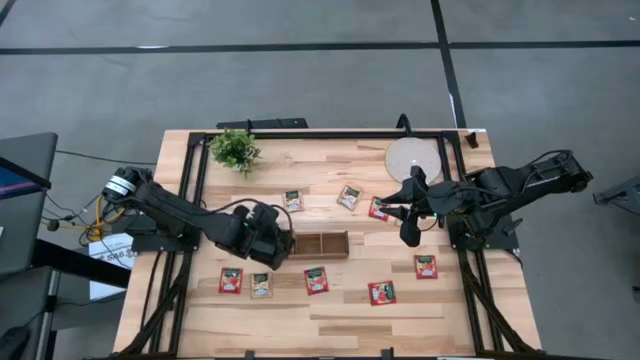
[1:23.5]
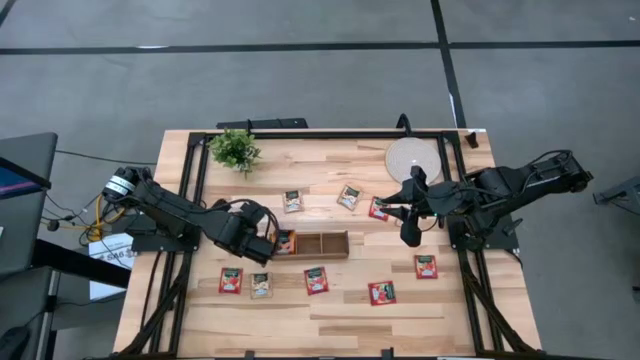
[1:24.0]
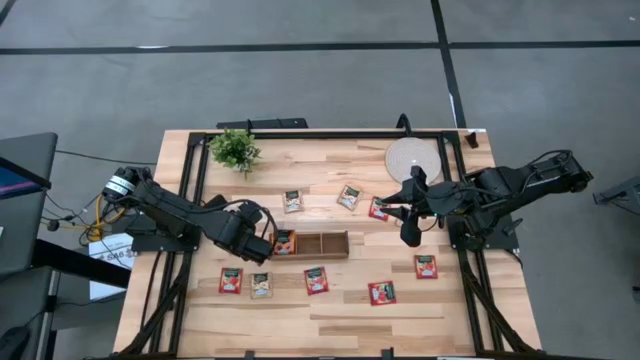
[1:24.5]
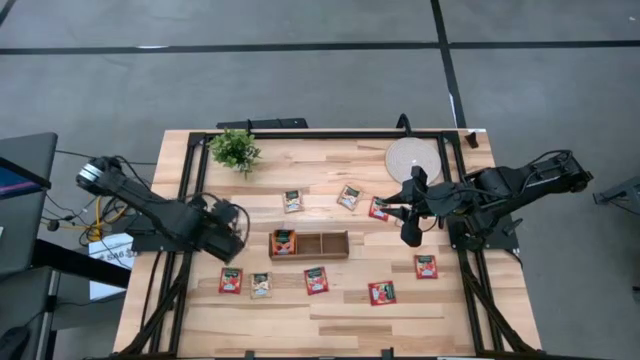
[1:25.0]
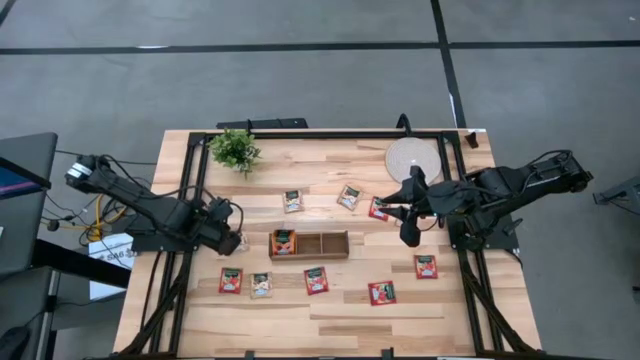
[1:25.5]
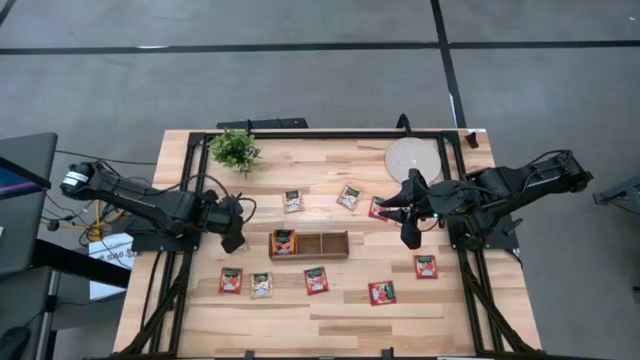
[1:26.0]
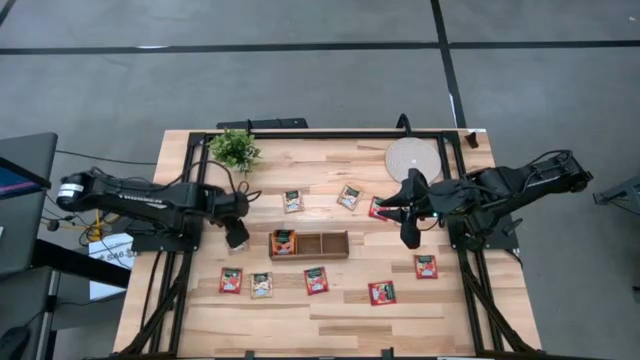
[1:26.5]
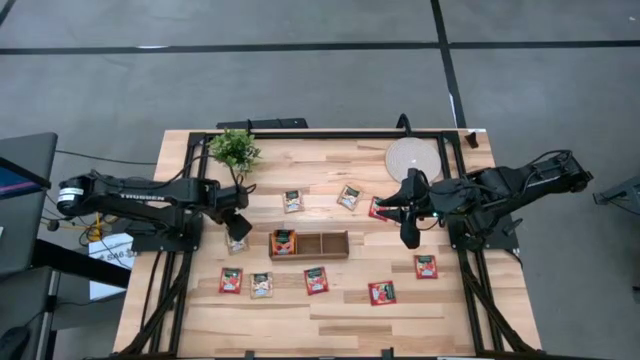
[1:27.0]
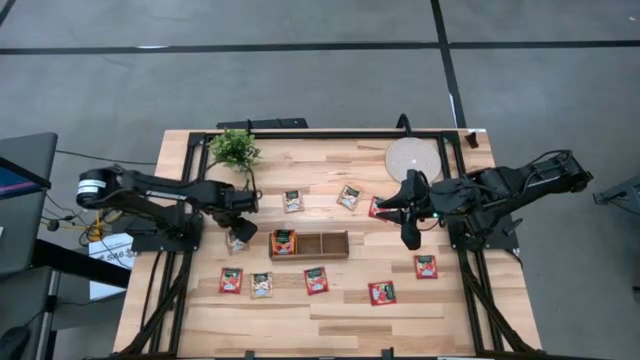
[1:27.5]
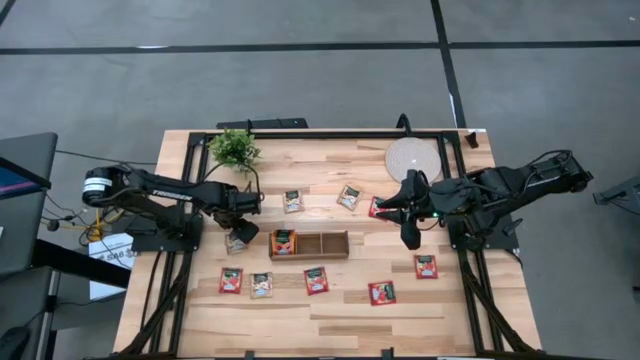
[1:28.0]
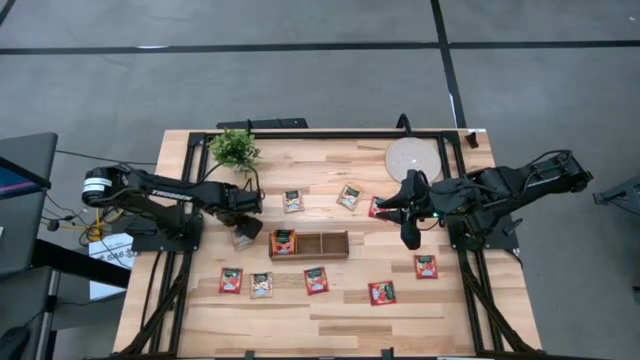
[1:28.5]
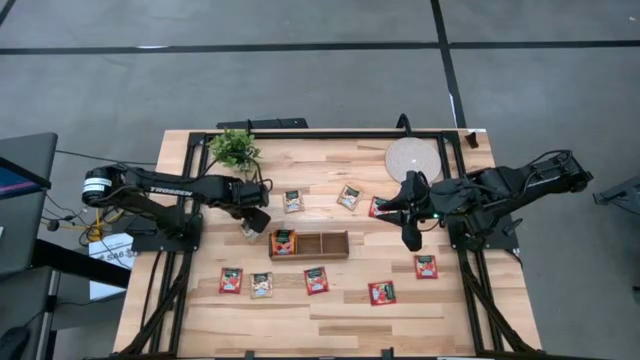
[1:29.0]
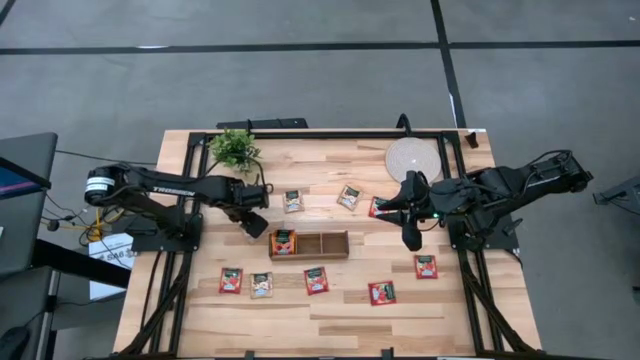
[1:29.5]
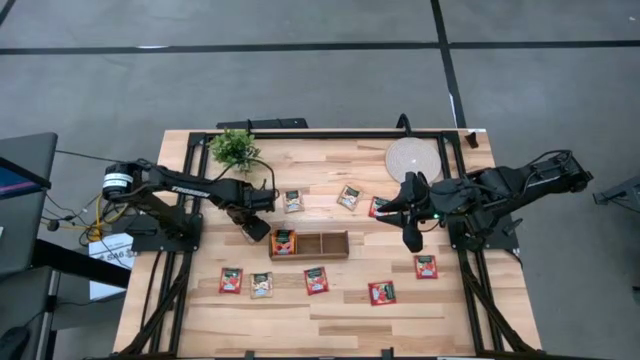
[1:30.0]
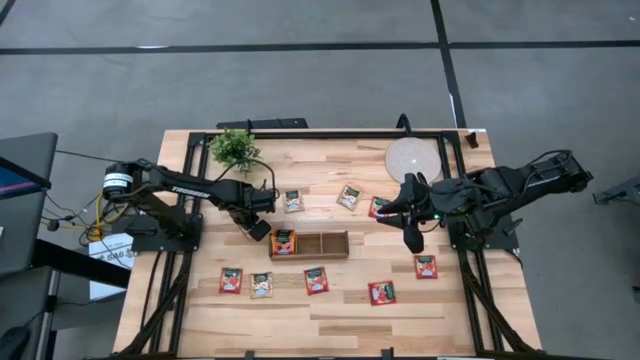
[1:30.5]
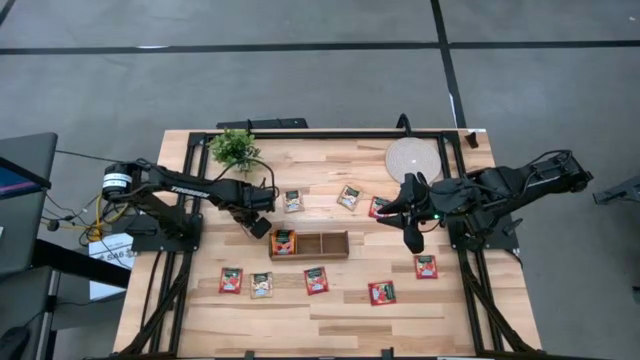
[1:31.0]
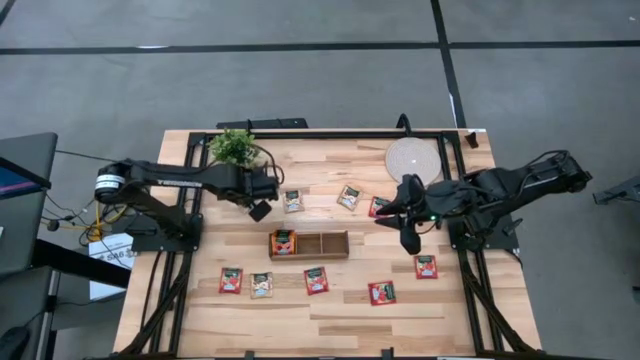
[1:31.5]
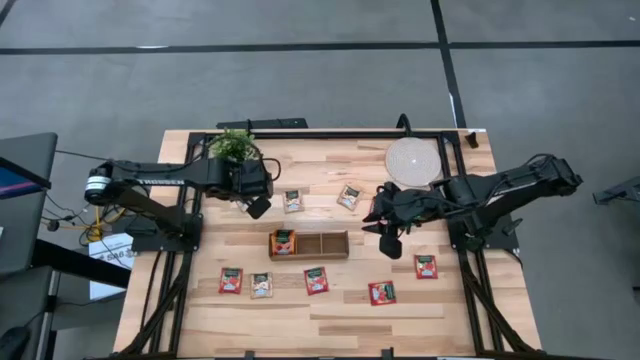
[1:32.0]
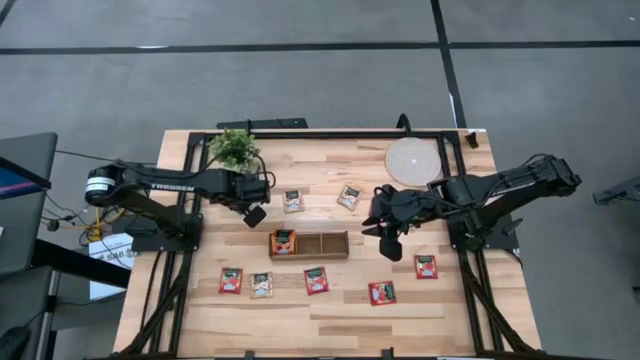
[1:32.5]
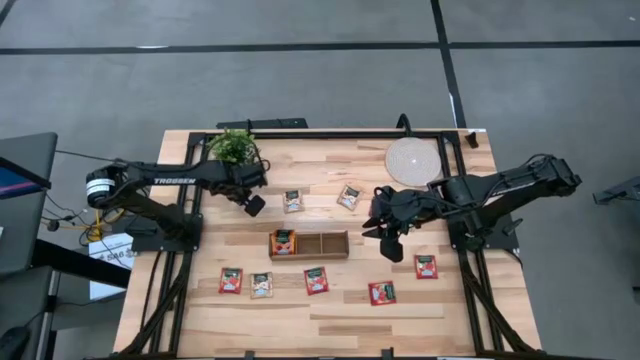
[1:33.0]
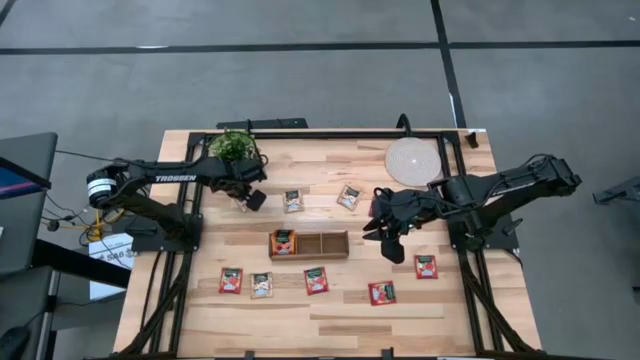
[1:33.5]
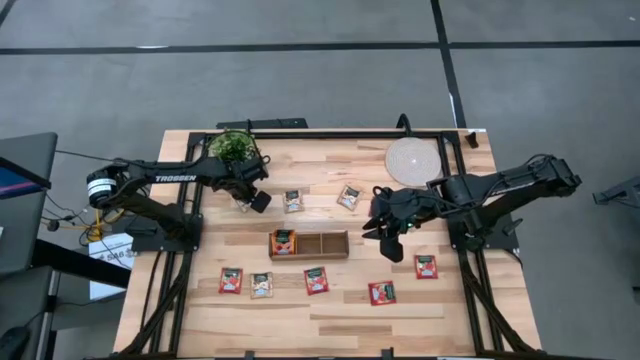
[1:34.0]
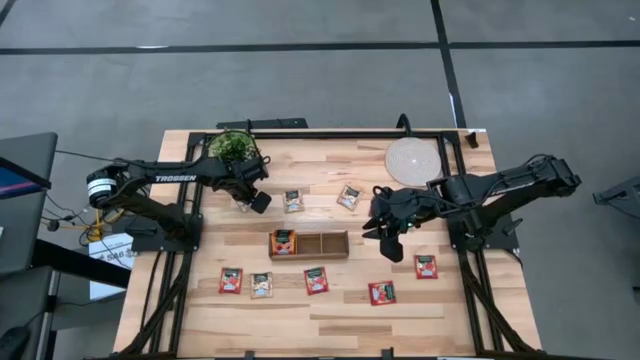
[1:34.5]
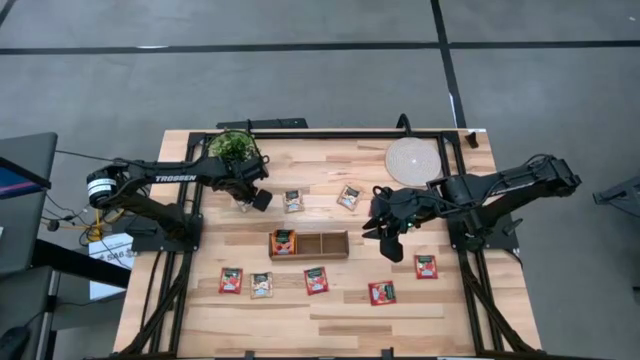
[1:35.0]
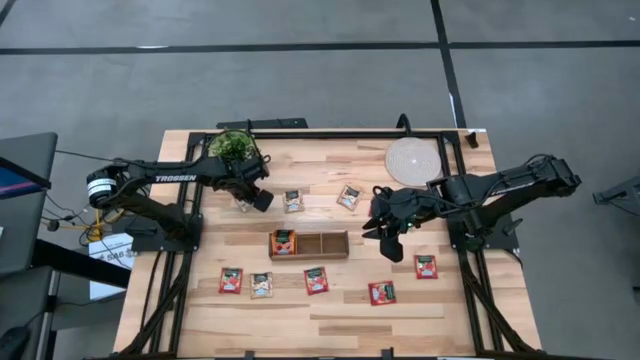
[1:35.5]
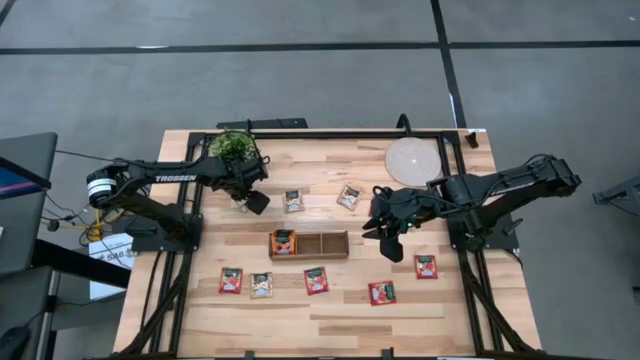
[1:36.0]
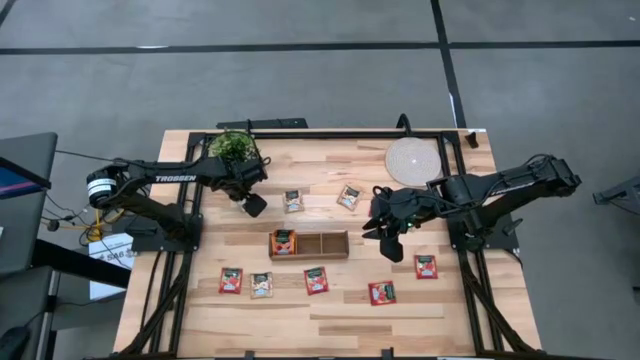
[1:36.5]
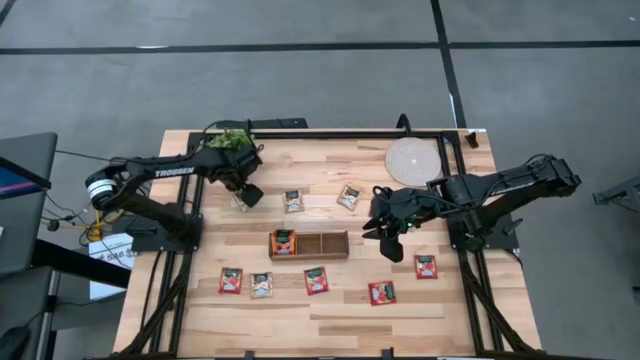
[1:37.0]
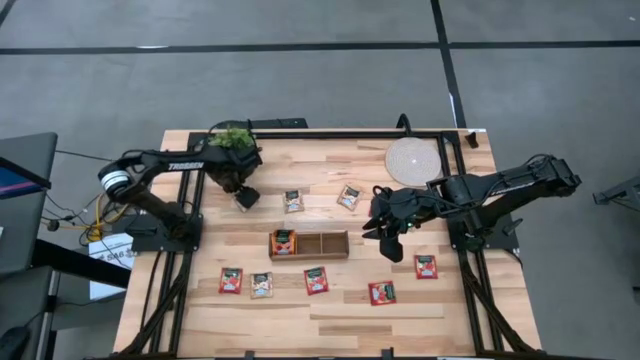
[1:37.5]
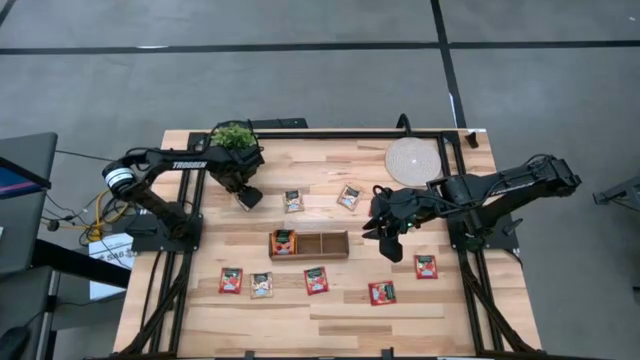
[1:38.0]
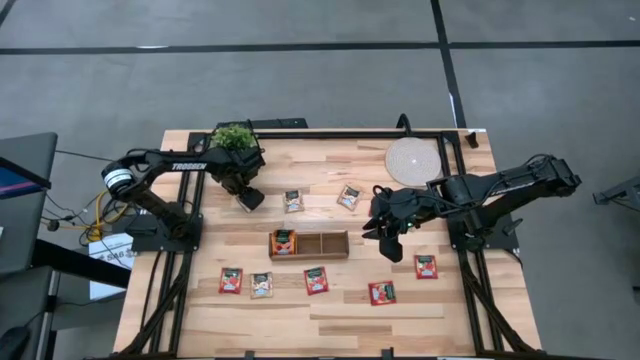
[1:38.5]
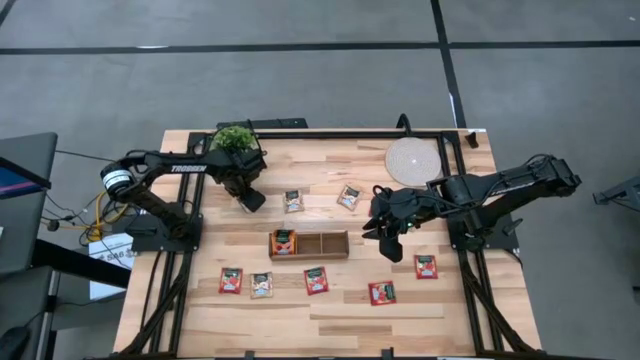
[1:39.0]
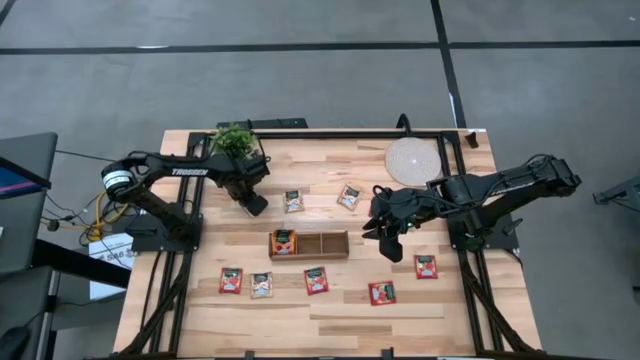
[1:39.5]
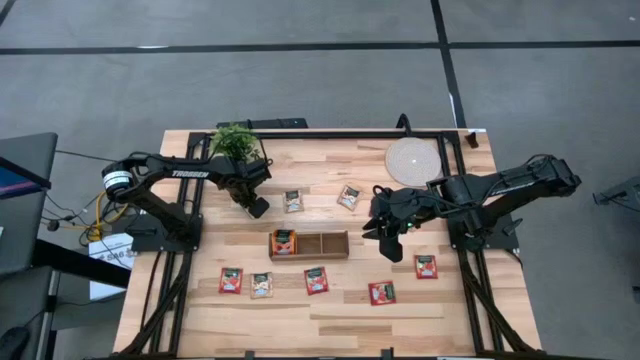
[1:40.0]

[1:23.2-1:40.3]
Task: Pick & Place Tea
Put the brown tea bag into the middle section of the wooden organizer

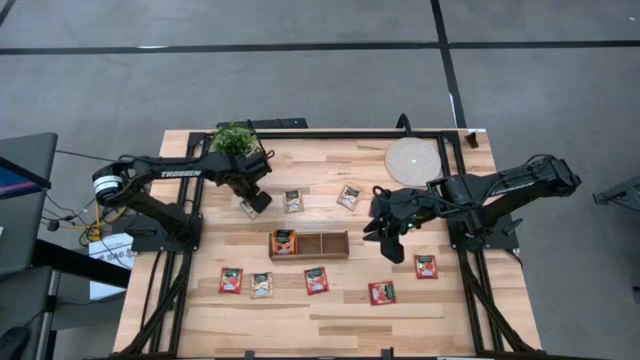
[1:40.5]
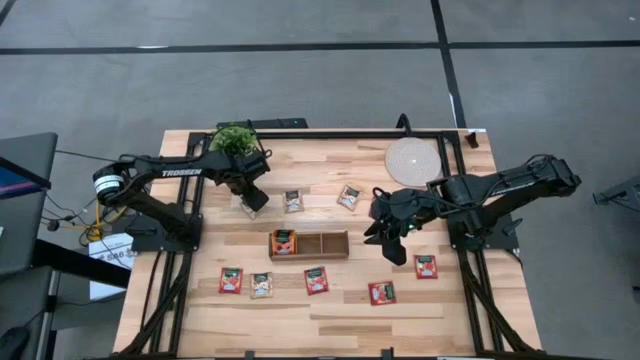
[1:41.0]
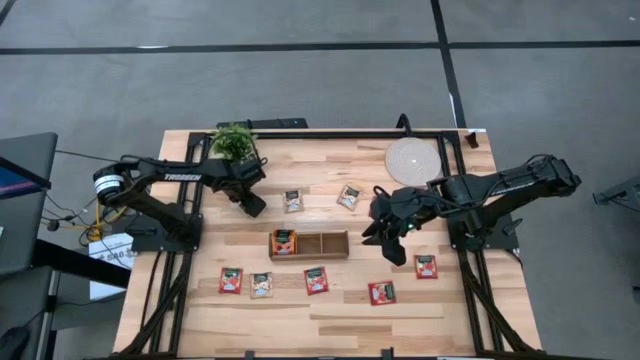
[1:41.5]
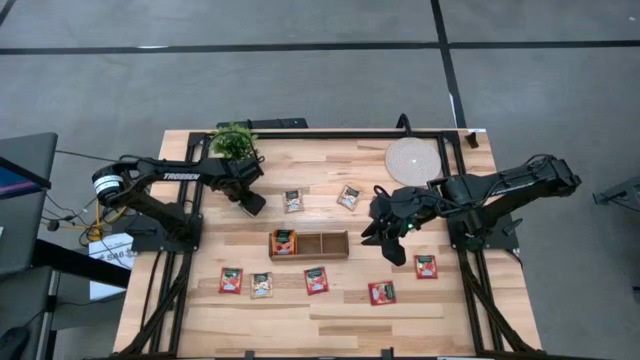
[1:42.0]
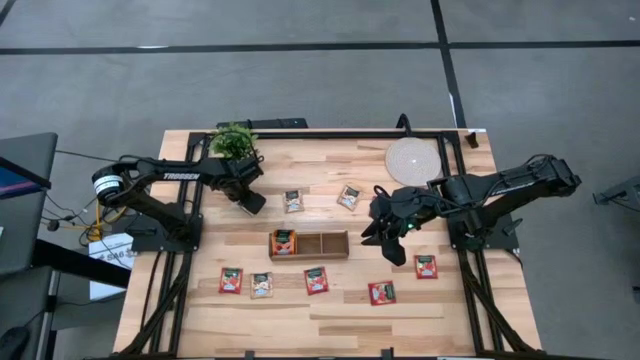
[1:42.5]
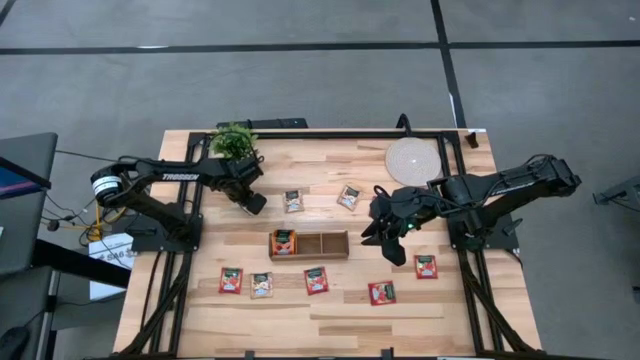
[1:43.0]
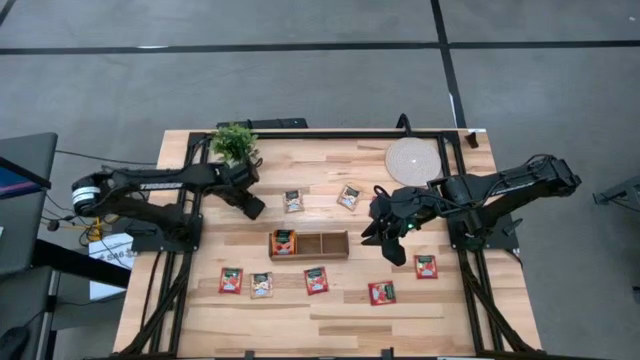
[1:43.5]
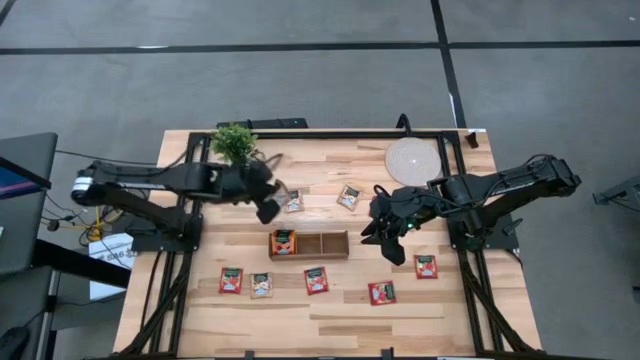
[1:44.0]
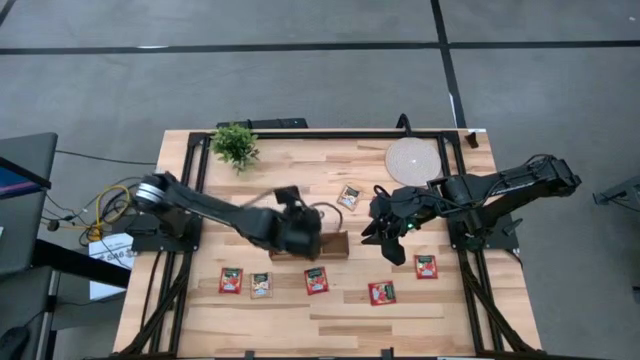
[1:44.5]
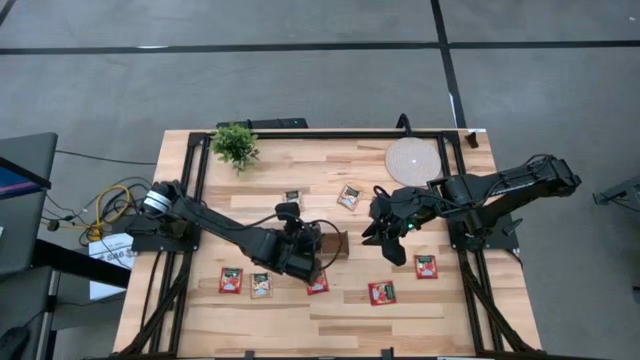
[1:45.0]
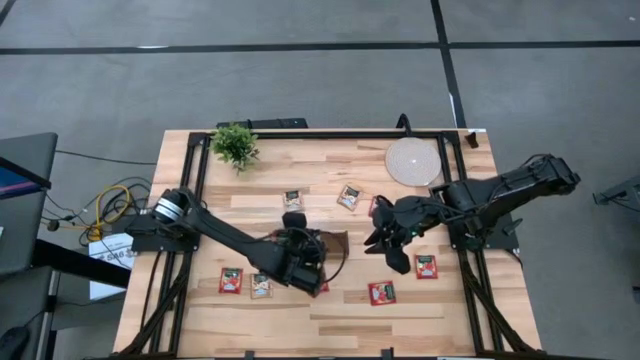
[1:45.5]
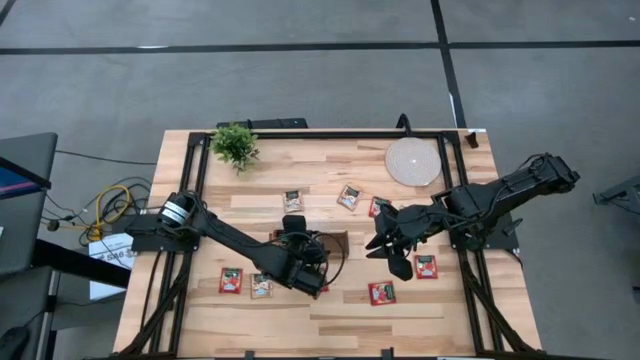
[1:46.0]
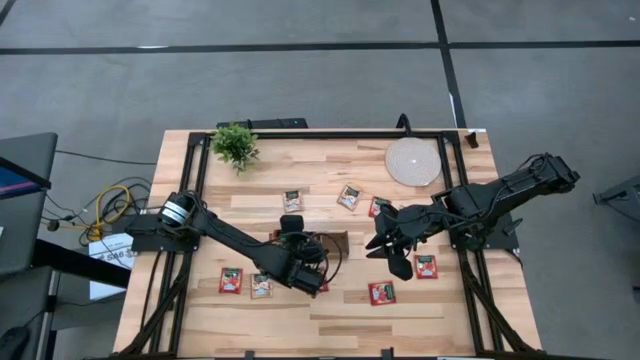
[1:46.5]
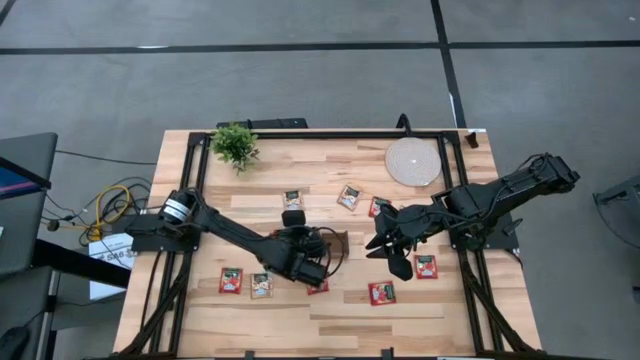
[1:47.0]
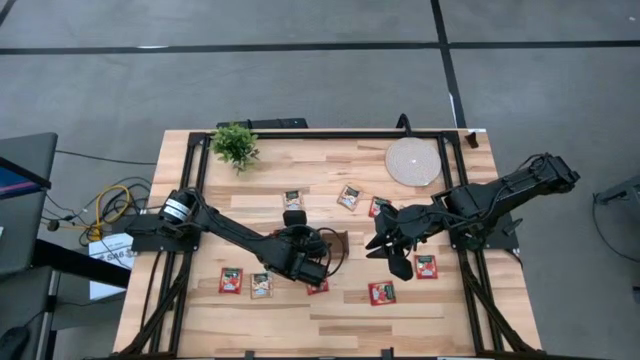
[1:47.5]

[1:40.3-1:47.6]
Put the brown tea bag into the middle section of the wooden organizer
